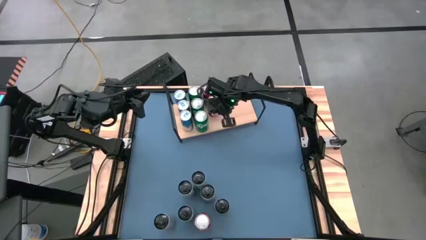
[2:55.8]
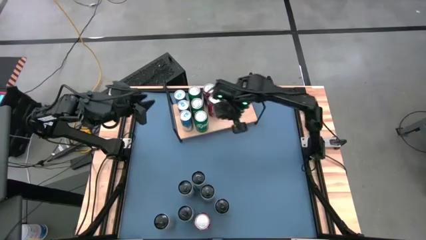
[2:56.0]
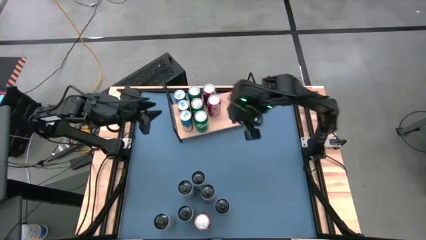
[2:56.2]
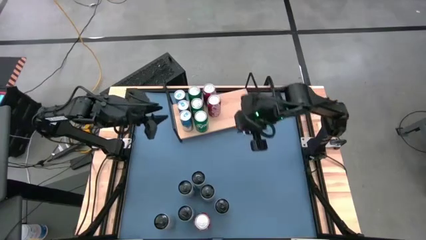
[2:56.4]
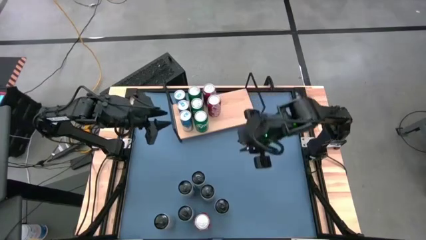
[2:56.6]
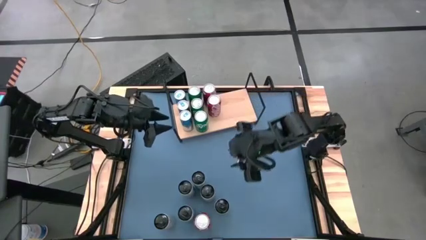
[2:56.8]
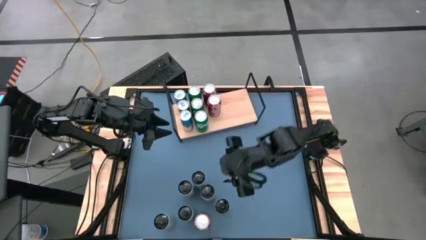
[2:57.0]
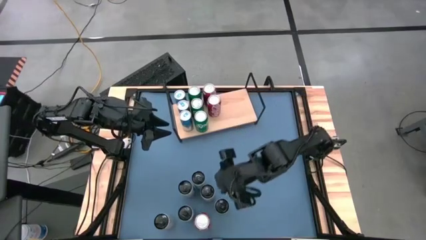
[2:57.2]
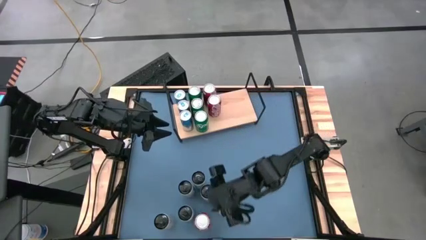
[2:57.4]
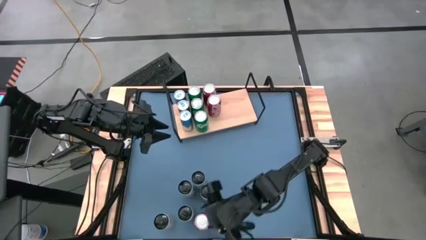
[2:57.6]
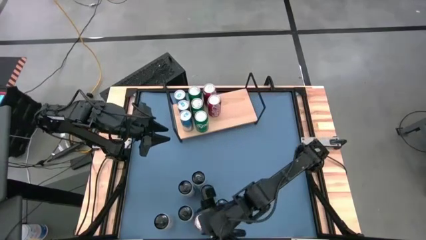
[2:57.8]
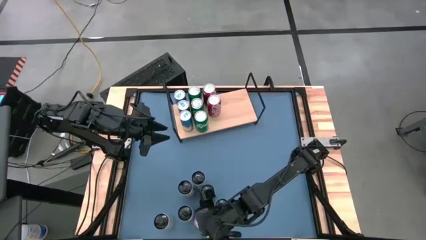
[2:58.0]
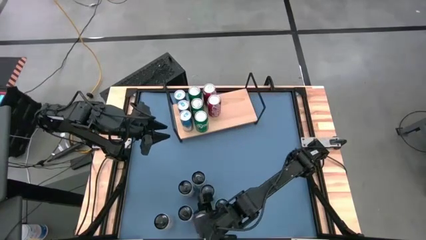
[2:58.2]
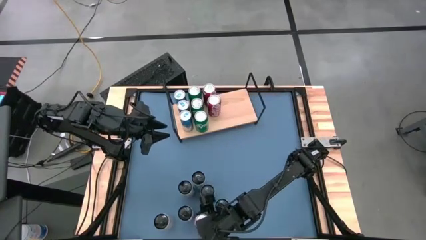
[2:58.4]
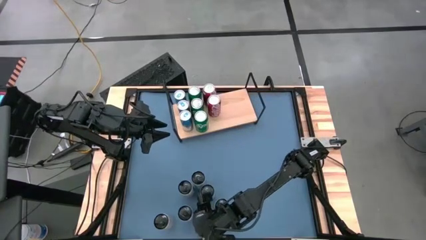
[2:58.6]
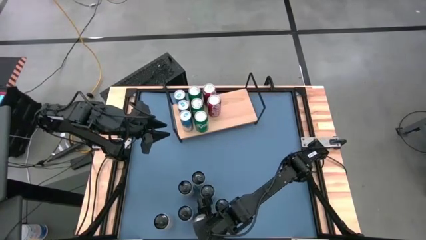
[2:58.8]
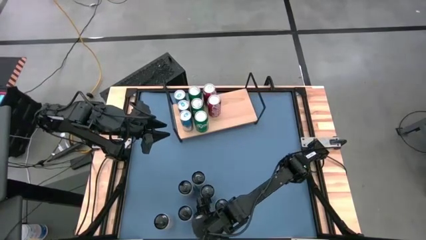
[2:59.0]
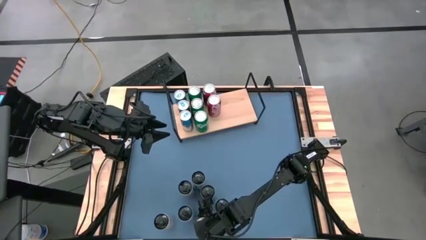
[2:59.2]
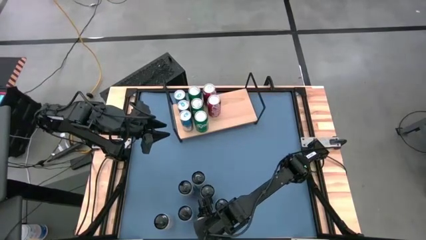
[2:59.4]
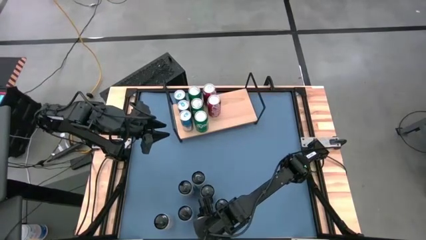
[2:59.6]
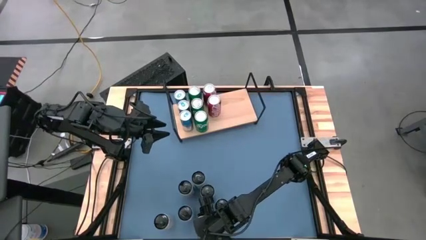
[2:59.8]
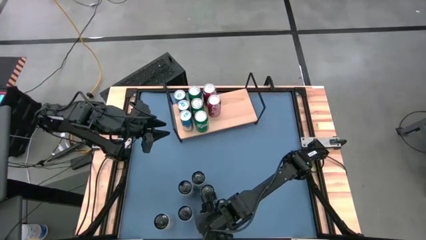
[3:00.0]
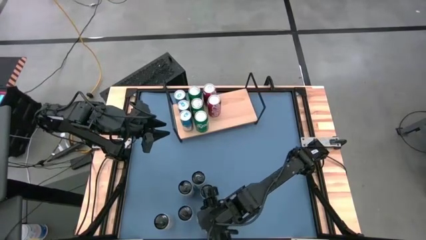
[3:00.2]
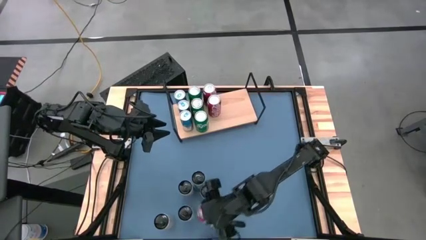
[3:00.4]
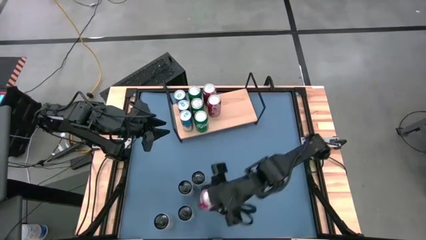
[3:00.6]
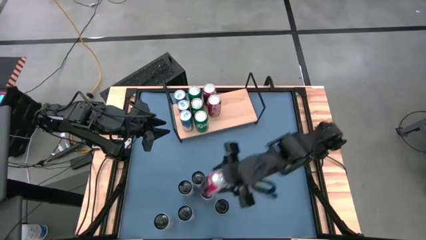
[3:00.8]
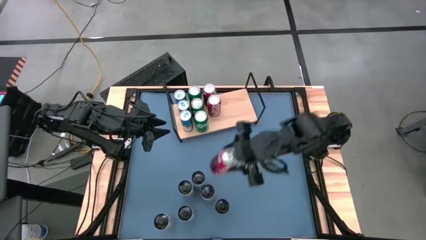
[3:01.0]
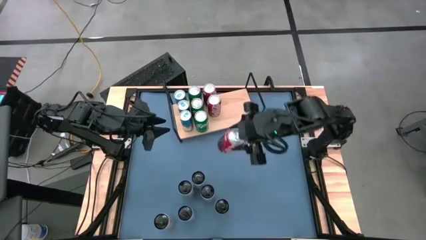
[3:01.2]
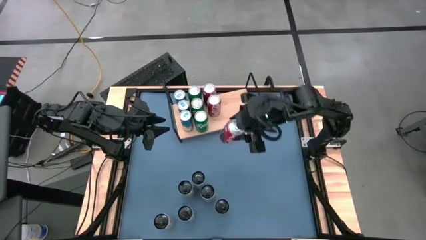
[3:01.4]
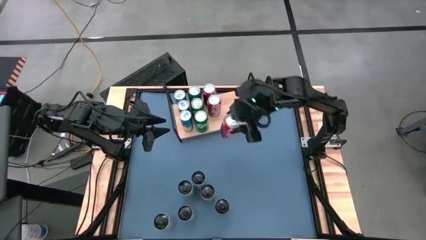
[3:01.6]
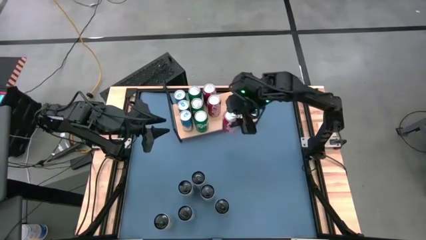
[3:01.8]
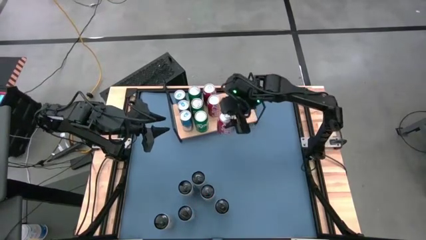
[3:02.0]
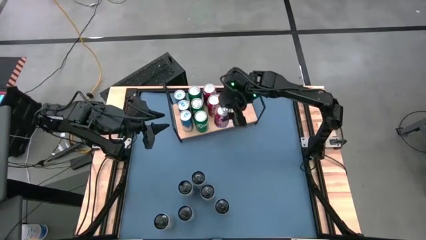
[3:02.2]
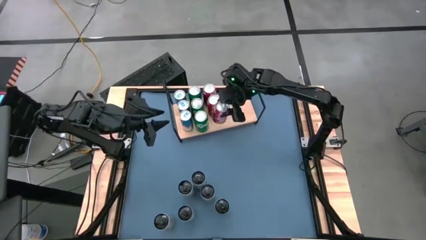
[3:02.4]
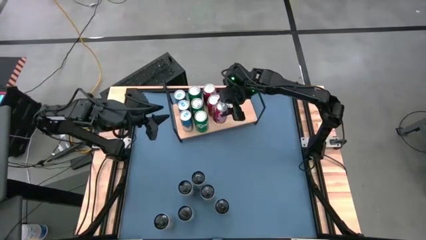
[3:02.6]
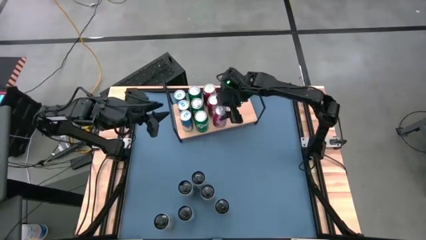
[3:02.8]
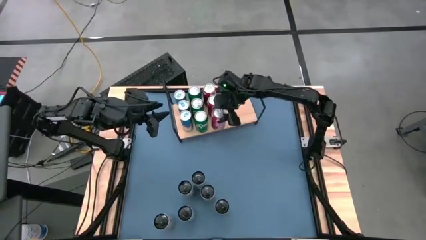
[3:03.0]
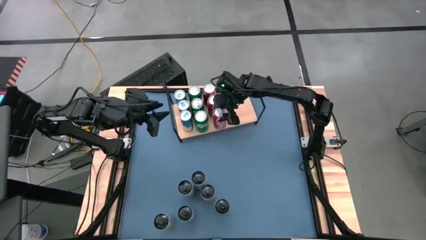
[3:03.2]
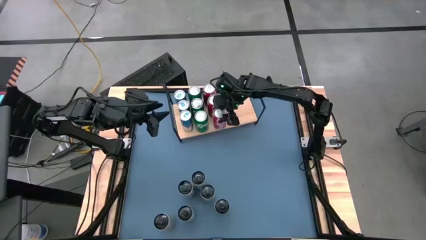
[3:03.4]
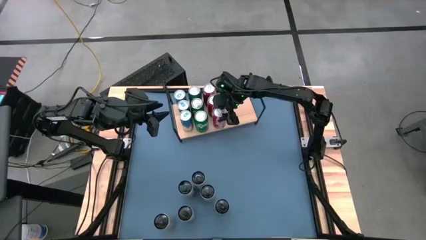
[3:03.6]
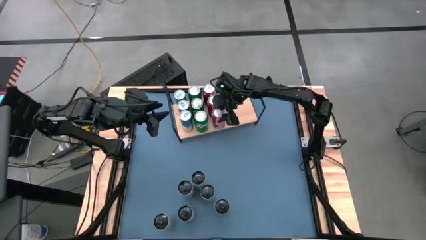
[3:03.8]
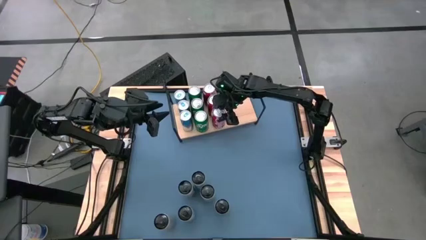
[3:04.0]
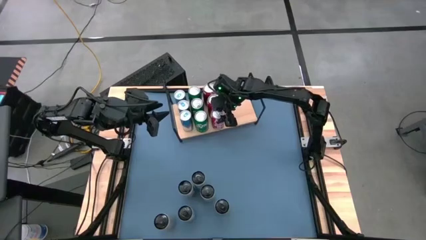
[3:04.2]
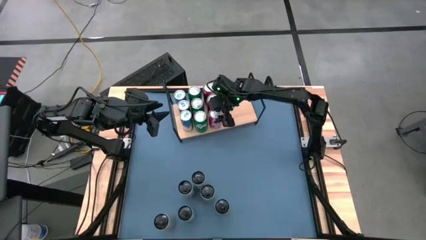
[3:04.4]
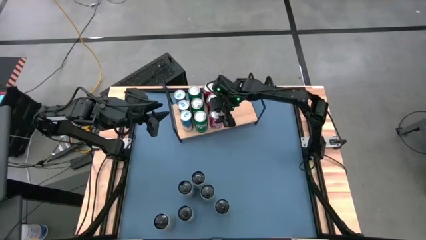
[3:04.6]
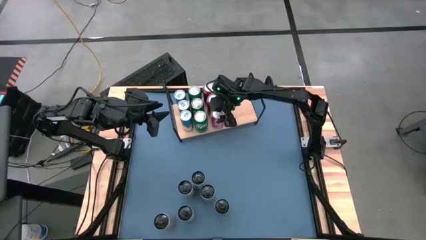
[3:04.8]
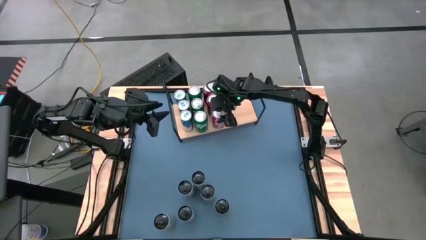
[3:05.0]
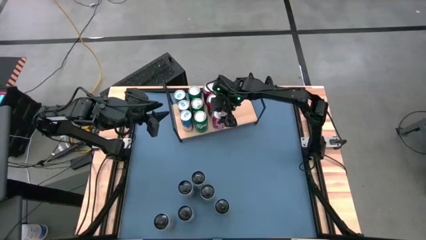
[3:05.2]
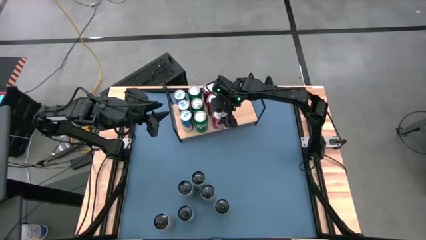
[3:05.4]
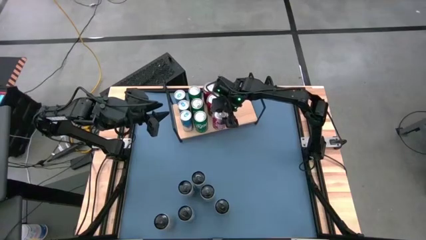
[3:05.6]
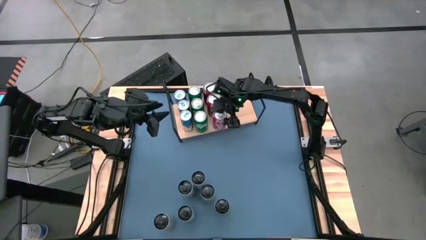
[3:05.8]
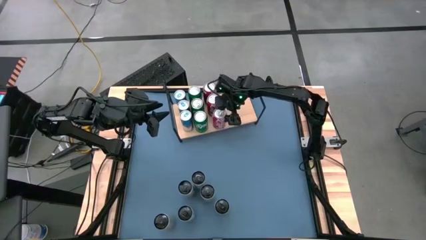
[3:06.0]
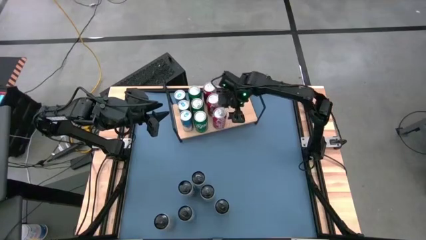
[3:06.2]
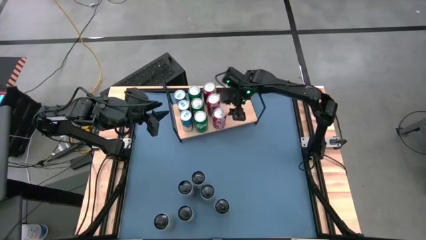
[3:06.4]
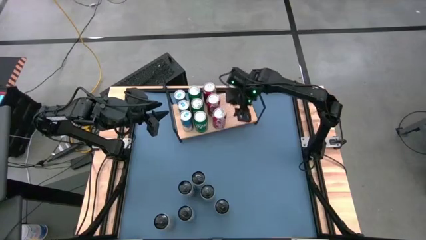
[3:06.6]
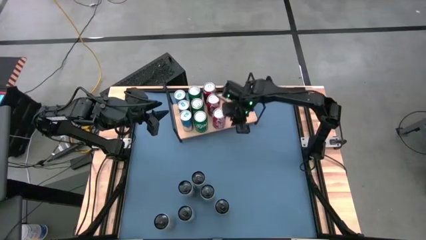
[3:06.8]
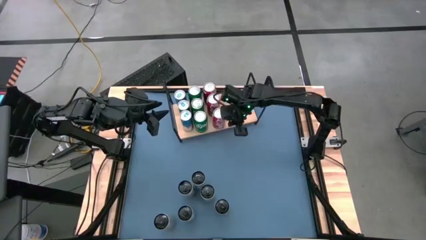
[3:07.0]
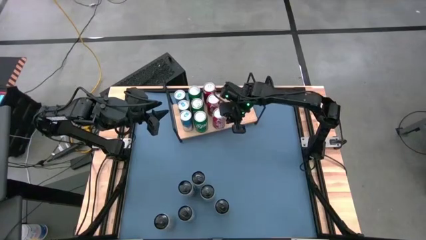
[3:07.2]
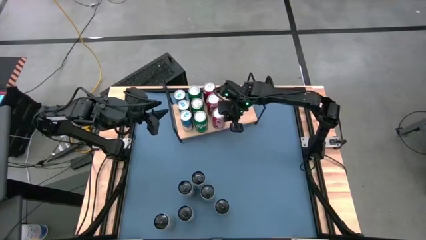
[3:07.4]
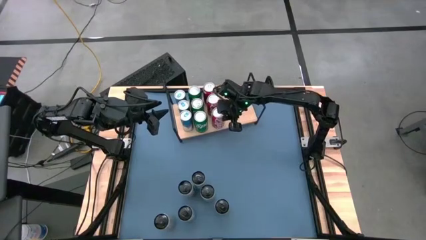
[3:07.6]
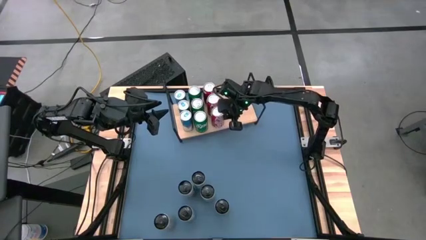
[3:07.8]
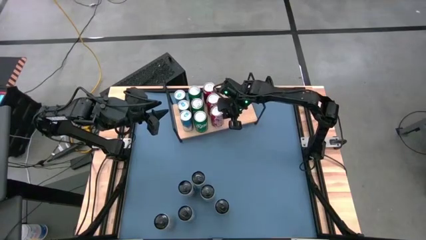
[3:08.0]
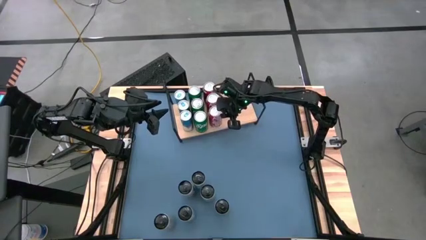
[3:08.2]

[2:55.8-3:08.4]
Task: Place canned beverage on shelf
Put the red soda can on the shelf aligned with the other red soda cans

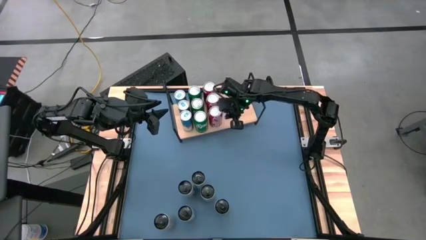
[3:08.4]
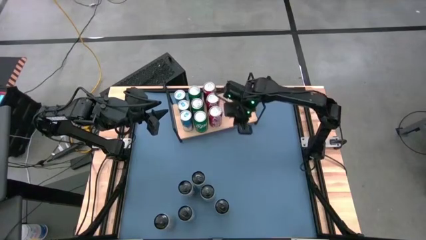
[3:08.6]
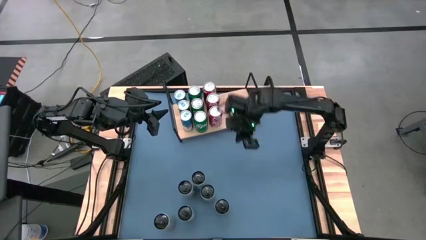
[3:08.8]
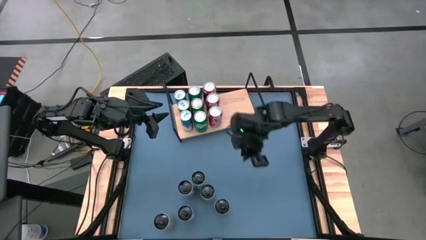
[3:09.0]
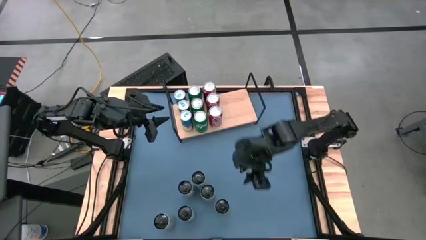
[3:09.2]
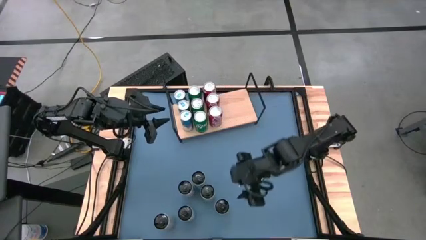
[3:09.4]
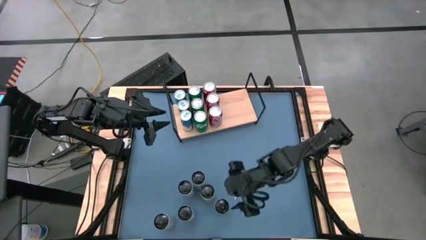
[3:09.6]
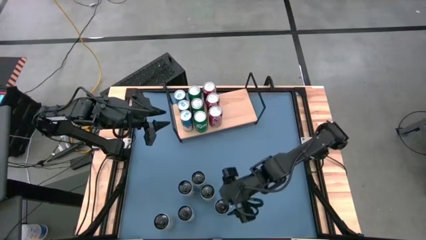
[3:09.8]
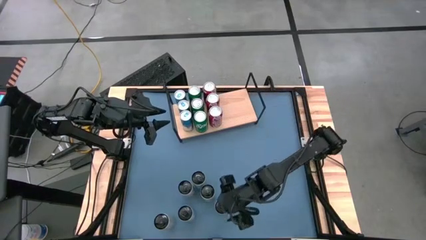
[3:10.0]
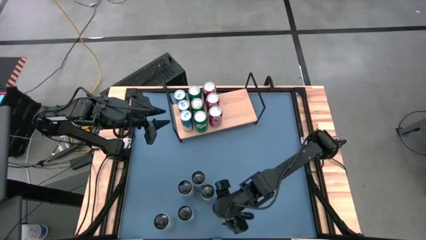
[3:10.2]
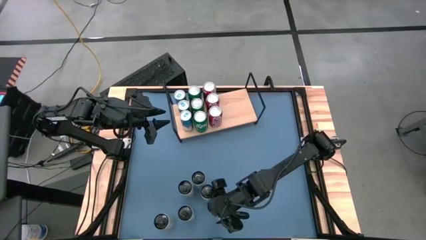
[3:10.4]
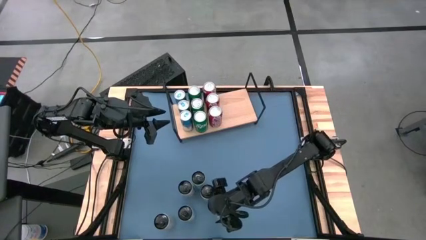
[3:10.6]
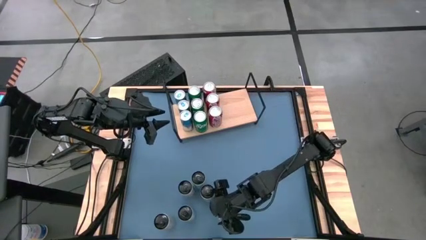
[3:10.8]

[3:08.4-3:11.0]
Put the middle white blue soda can on the shelf
